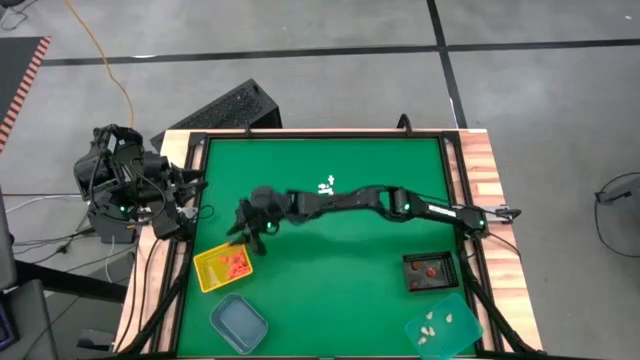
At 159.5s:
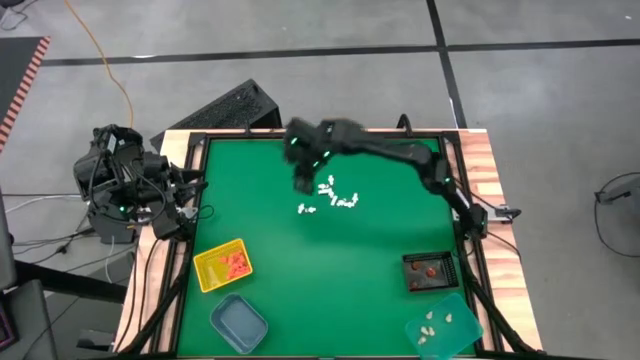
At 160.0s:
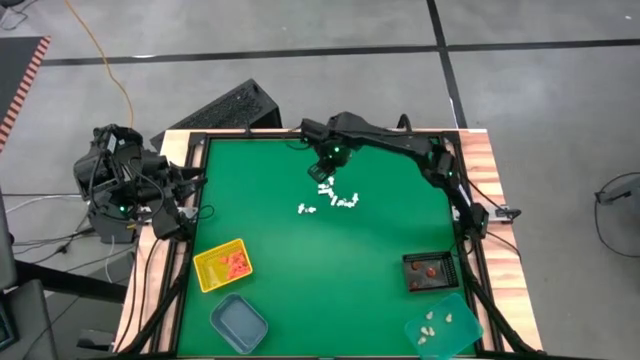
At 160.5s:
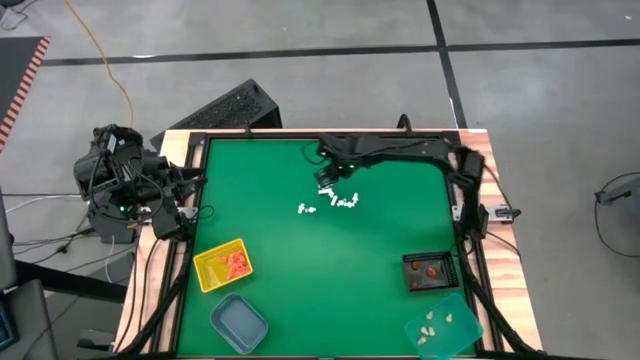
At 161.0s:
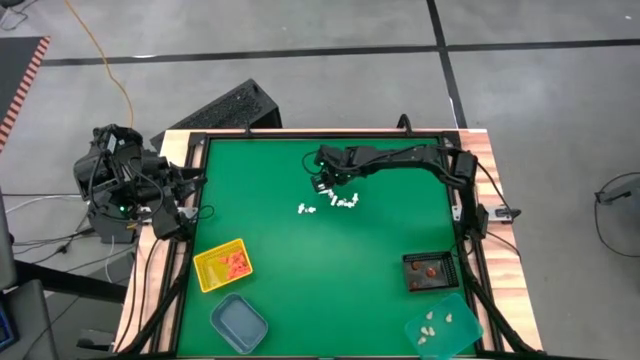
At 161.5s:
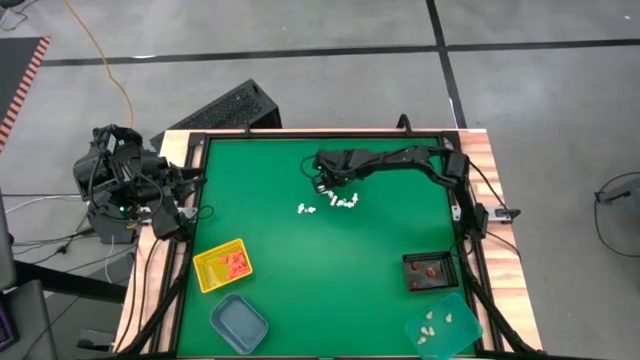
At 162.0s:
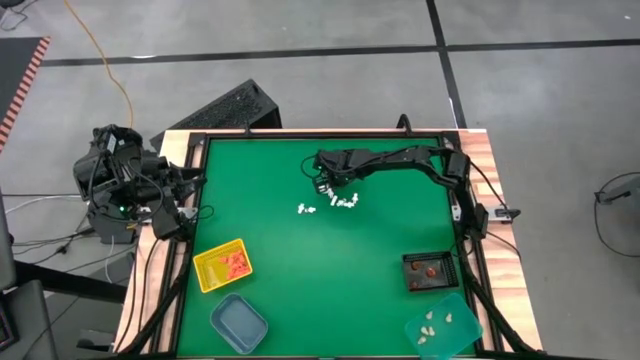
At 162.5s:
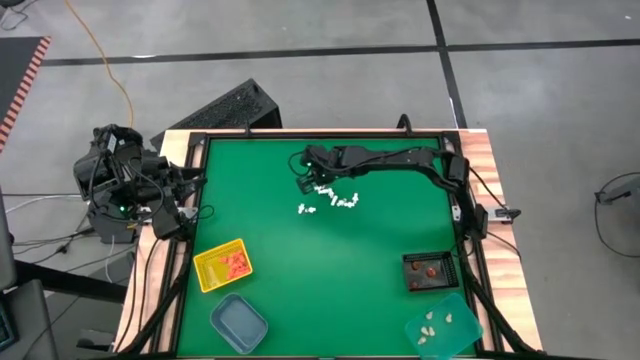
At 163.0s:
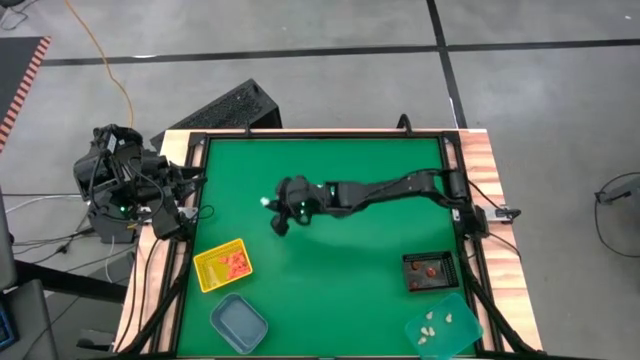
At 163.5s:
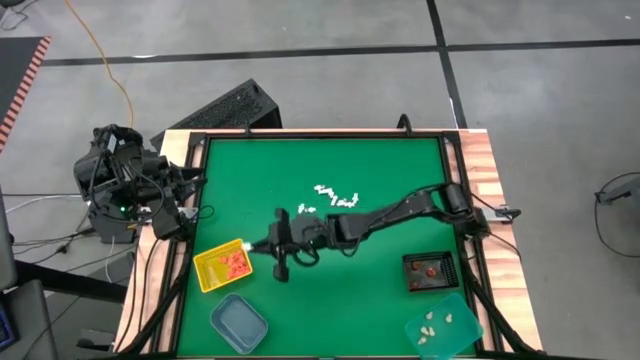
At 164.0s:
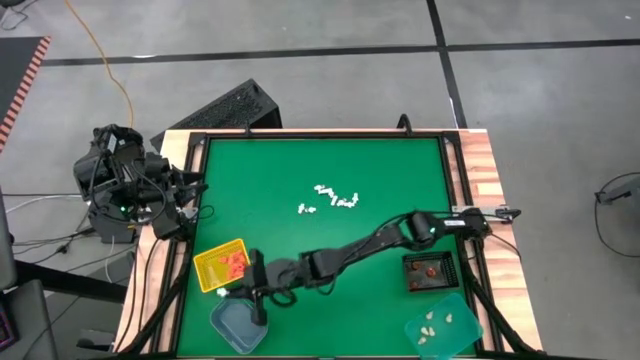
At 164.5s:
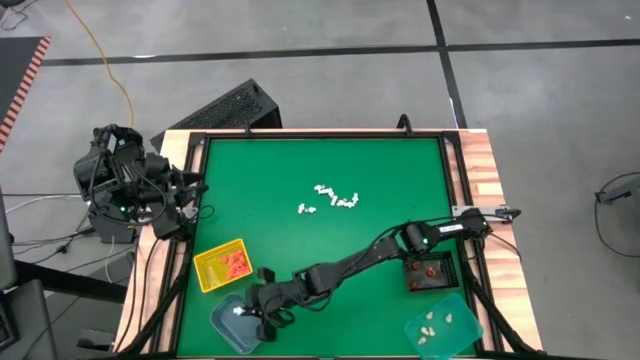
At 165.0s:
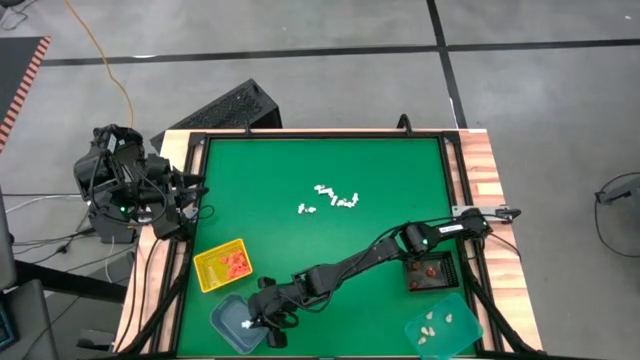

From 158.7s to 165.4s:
Task: Sort Halloween decoration
Put the white skeleton model into the blue bin

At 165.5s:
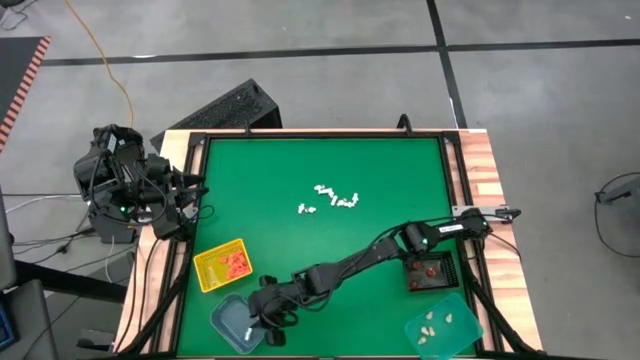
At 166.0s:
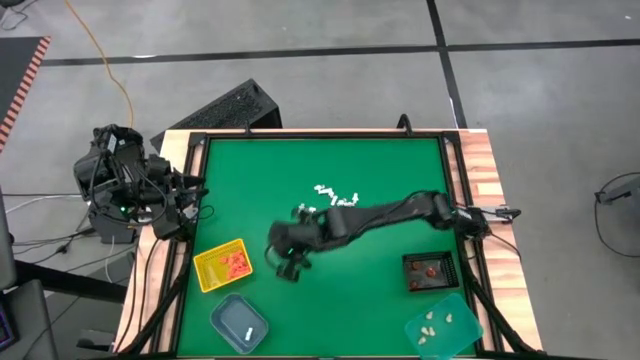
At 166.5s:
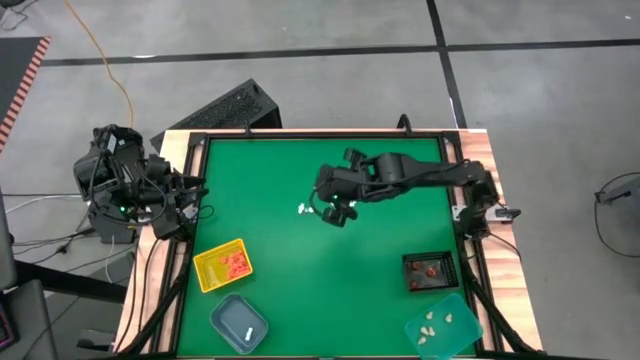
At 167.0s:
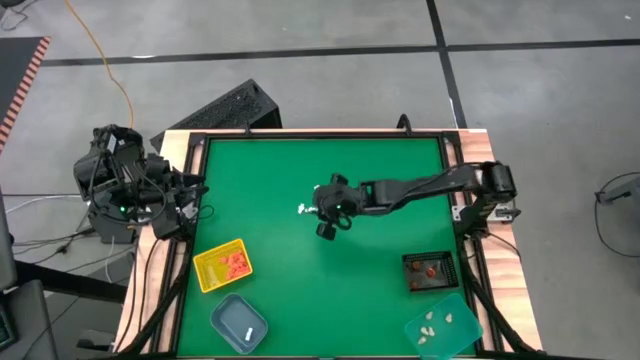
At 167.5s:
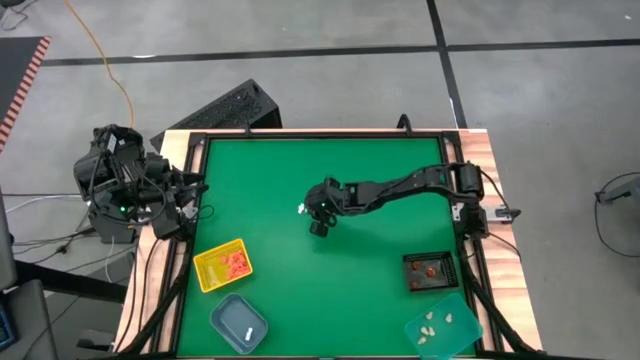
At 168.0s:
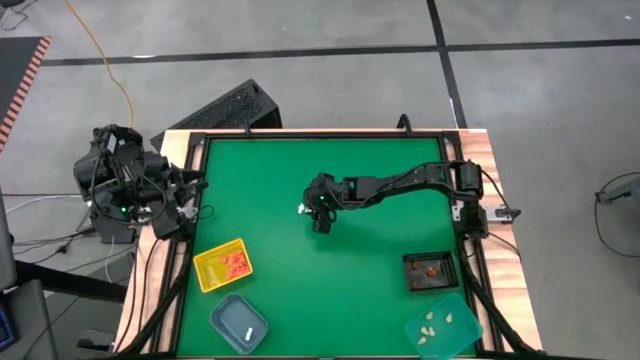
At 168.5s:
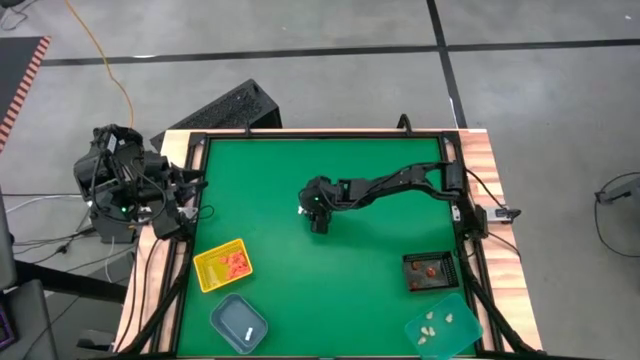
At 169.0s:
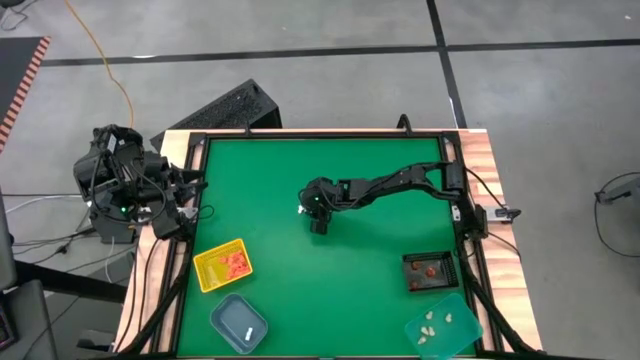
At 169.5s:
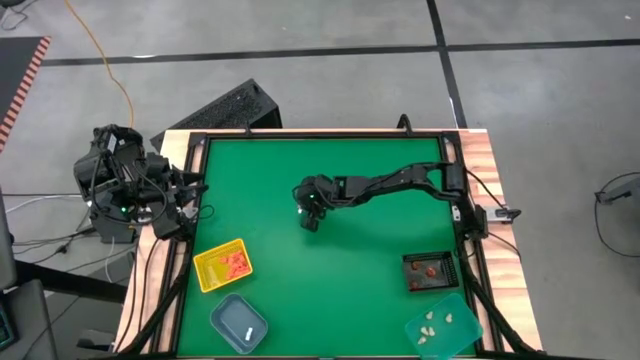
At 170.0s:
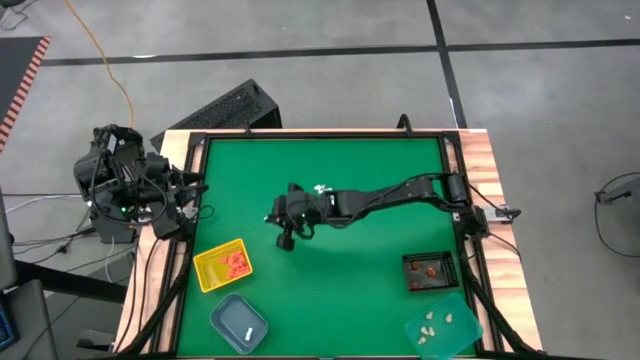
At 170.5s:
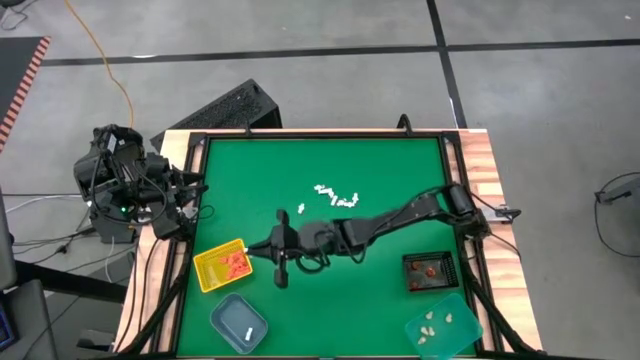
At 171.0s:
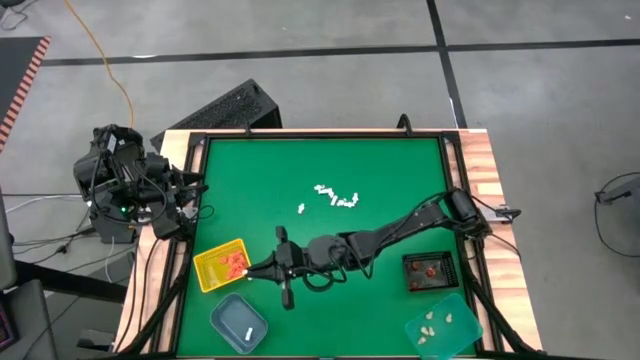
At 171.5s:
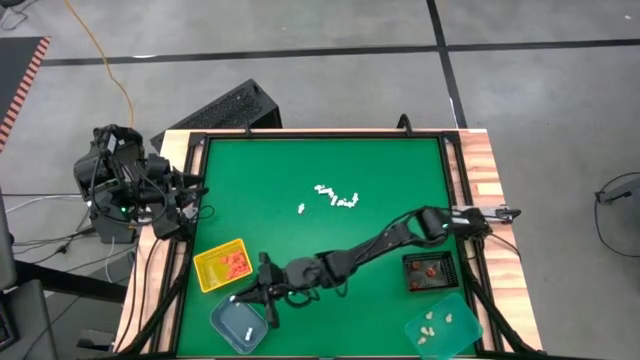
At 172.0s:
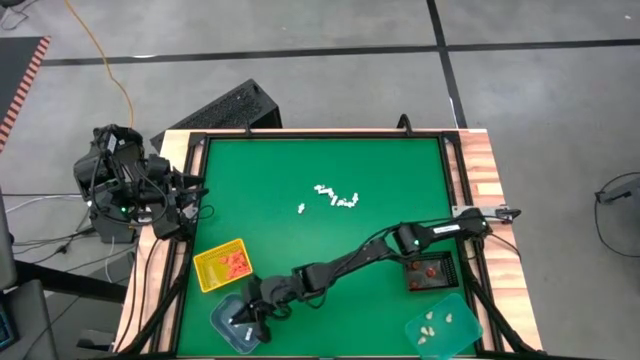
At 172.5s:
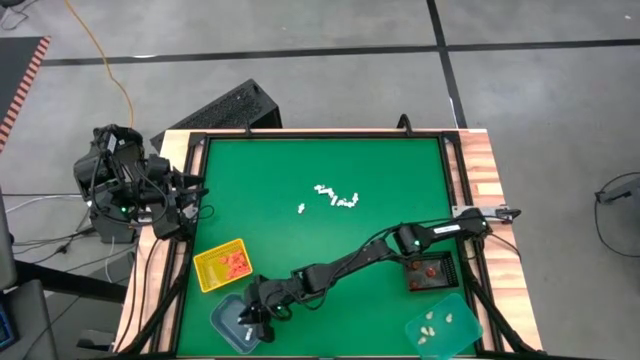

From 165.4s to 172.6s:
Put the white skeleton model into the blue bin

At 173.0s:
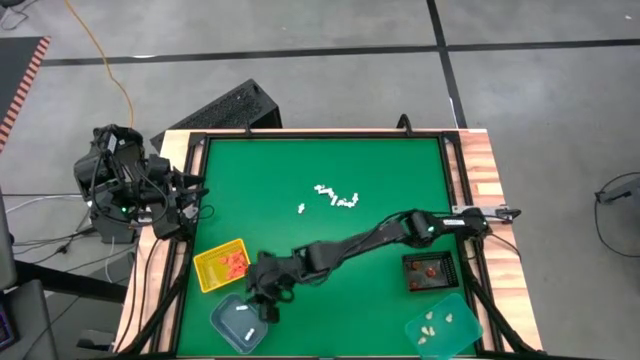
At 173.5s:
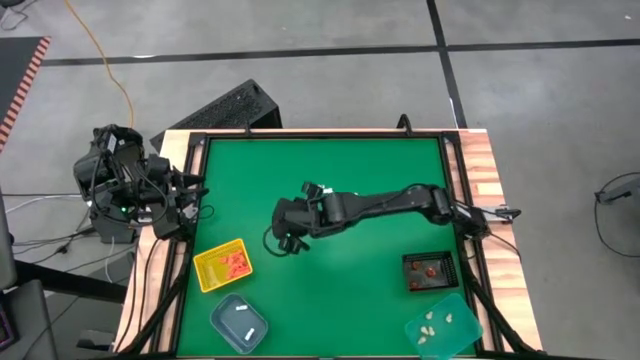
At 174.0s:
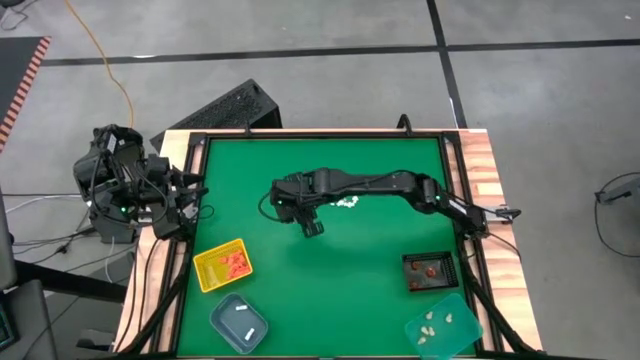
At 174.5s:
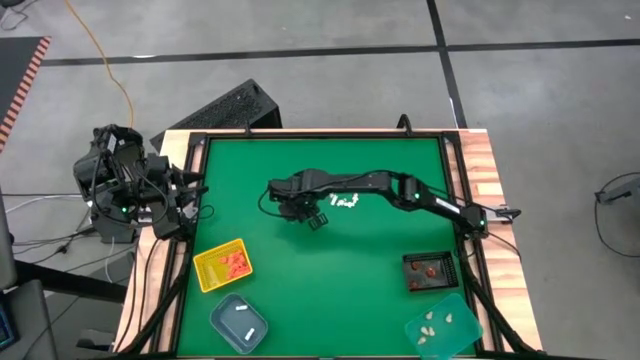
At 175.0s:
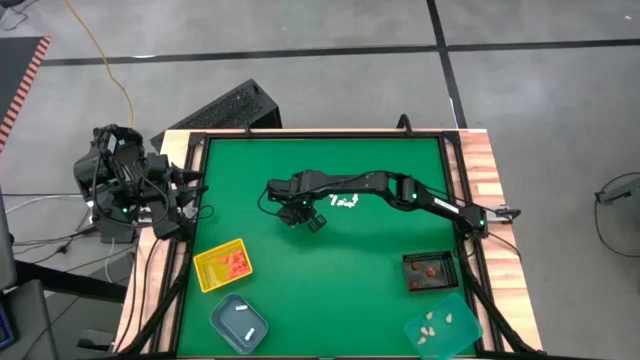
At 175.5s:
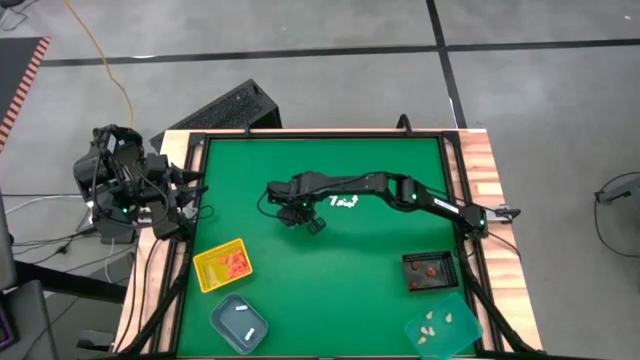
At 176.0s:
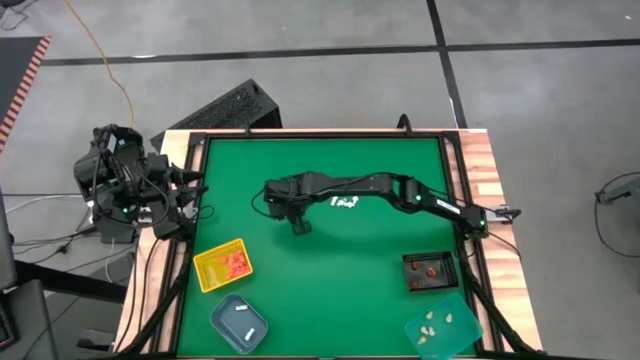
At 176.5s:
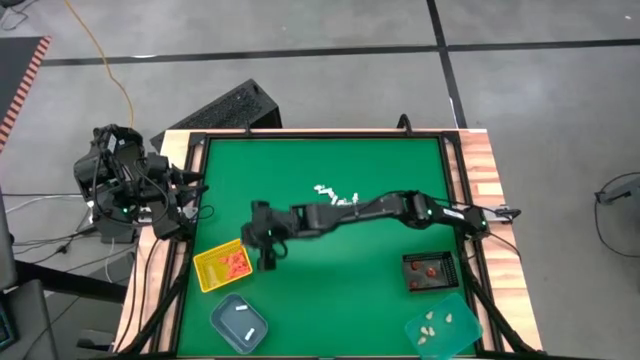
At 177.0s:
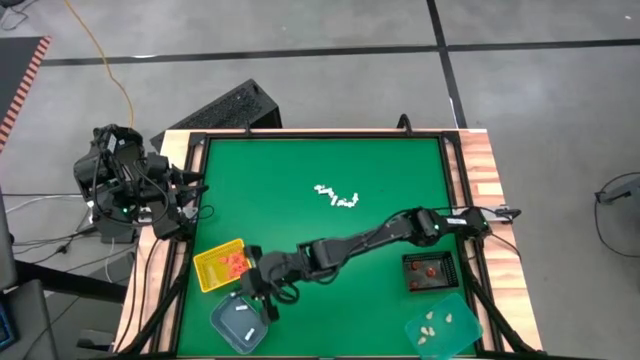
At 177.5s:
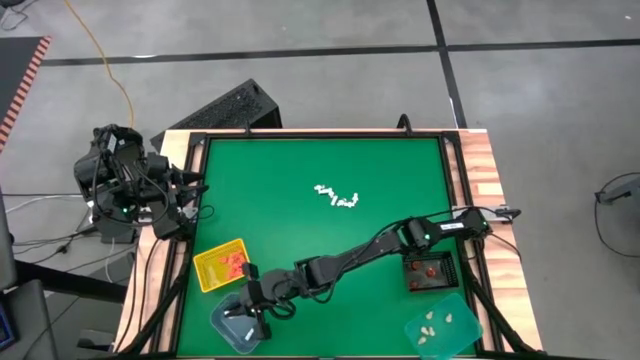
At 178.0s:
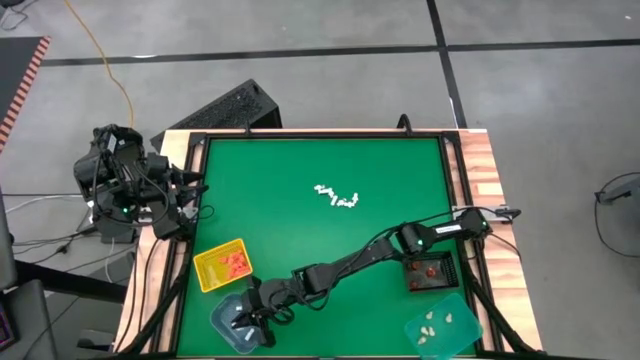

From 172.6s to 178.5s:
Put the white skeleton model into the blue bin

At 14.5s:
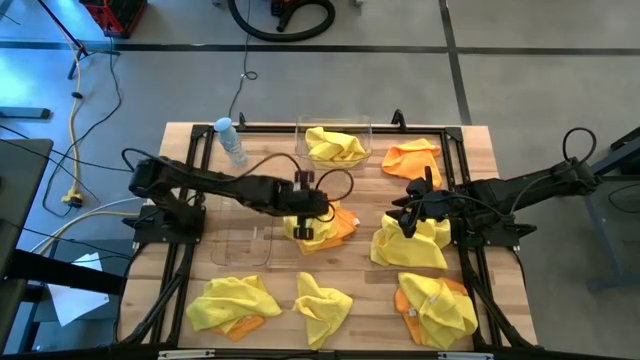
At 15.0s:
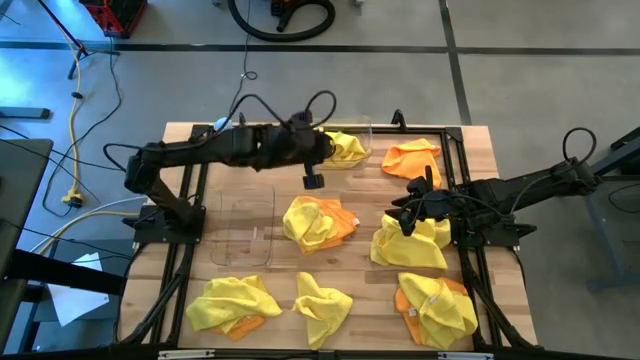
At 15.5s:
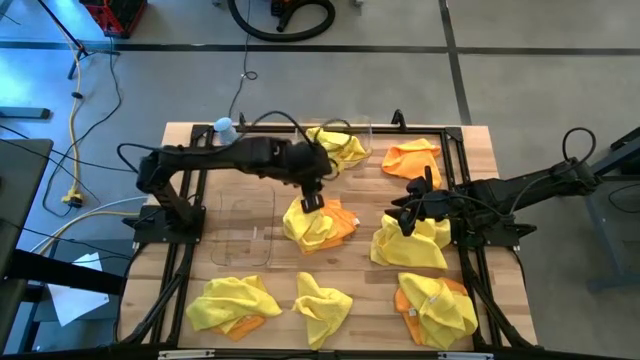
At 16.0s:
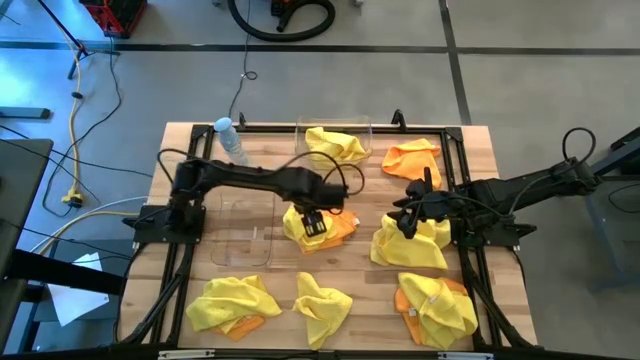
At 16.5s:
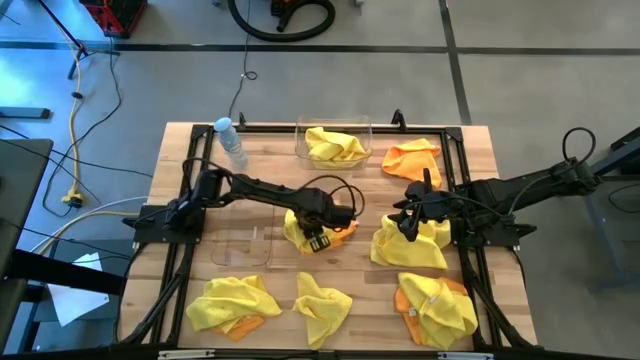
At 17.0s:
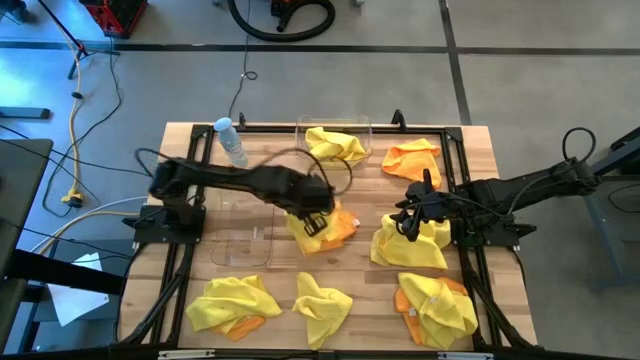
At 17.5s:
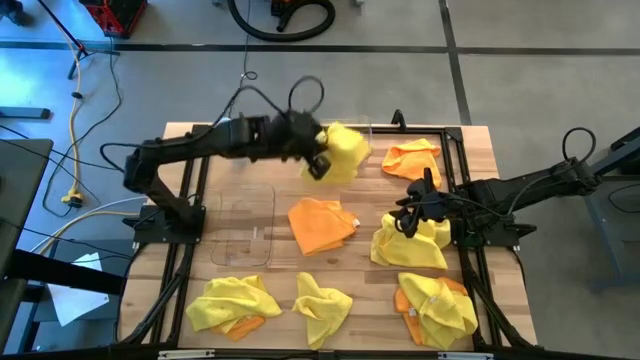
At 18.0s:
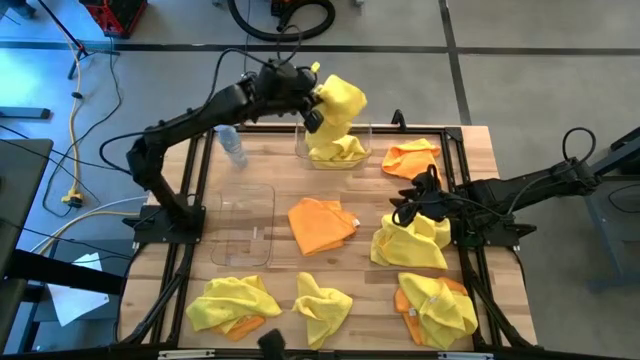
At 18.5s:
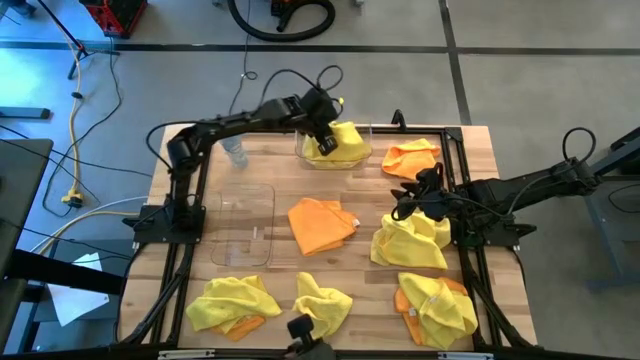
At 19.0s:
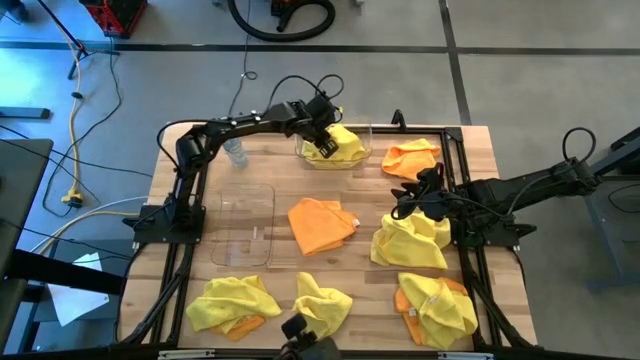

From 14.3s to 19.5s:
Task: Sort microfiber towel by color & place in baskets
Put the yellow microfiber towel into the top transparent bin
